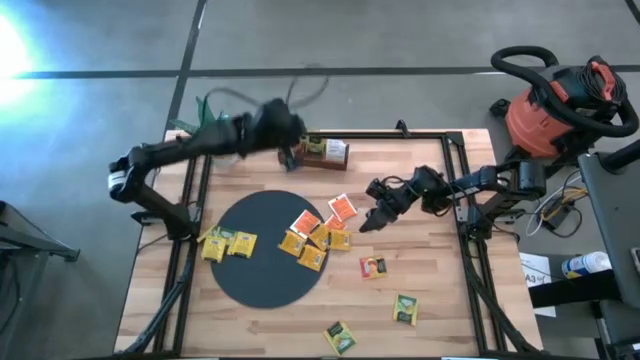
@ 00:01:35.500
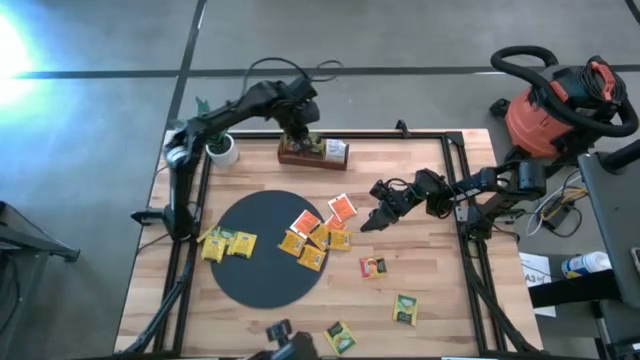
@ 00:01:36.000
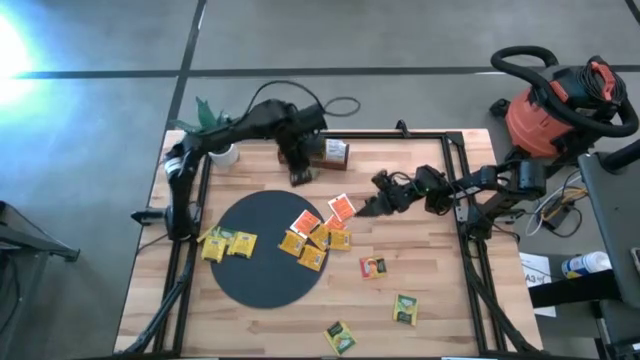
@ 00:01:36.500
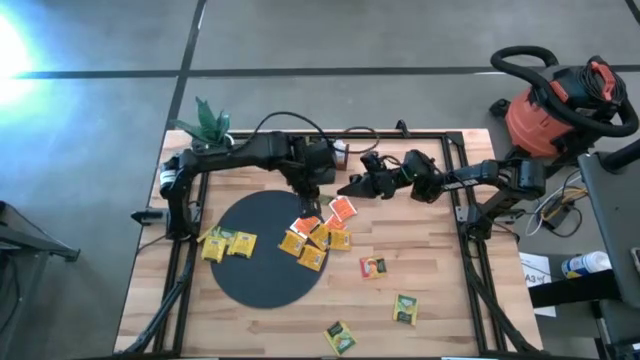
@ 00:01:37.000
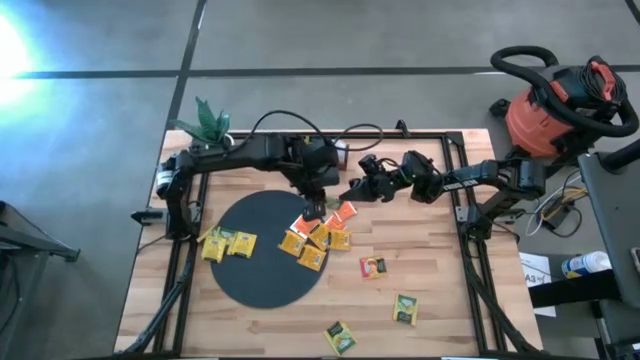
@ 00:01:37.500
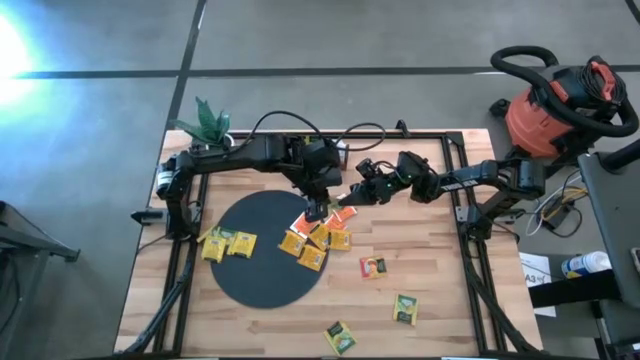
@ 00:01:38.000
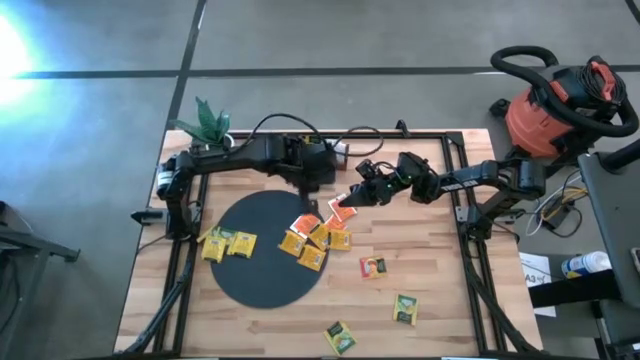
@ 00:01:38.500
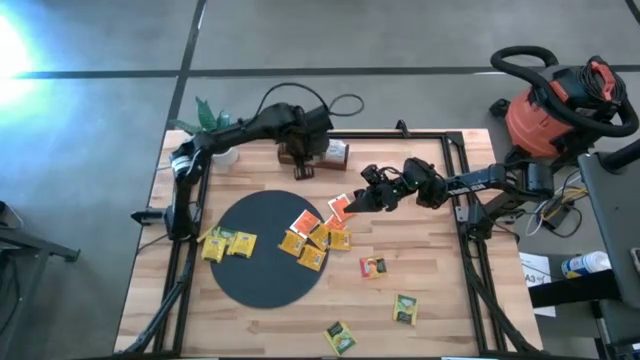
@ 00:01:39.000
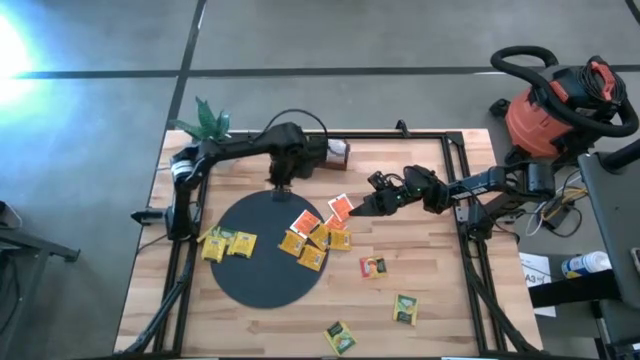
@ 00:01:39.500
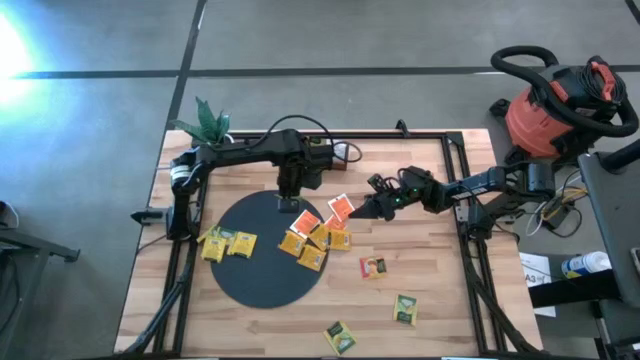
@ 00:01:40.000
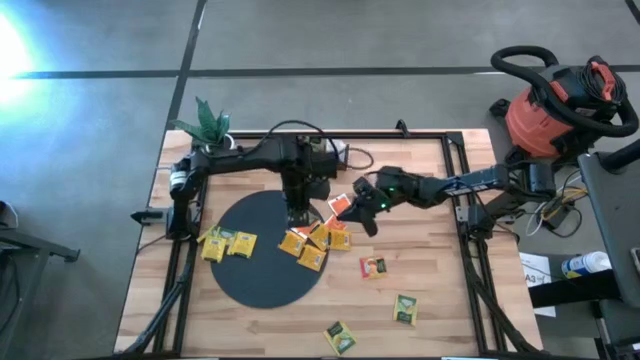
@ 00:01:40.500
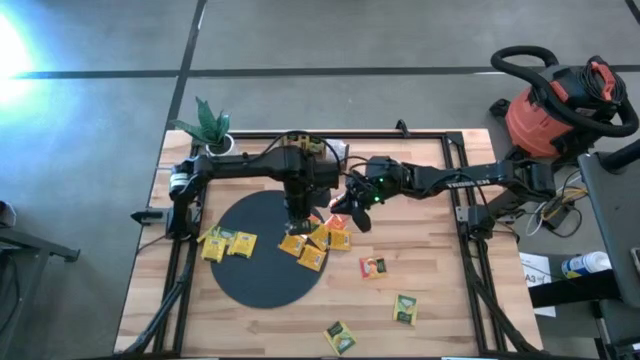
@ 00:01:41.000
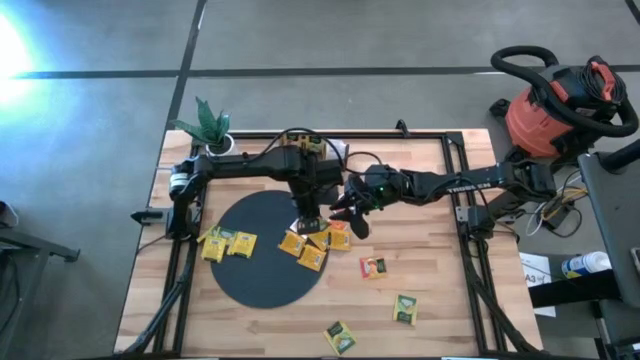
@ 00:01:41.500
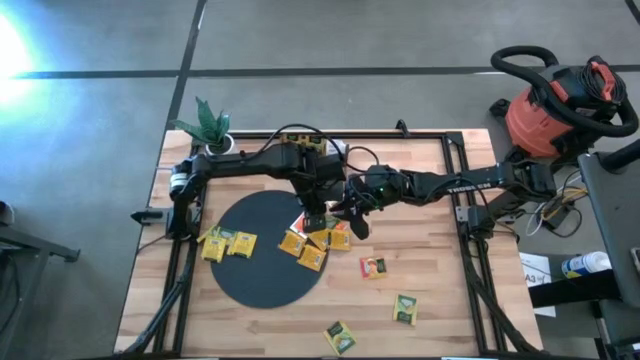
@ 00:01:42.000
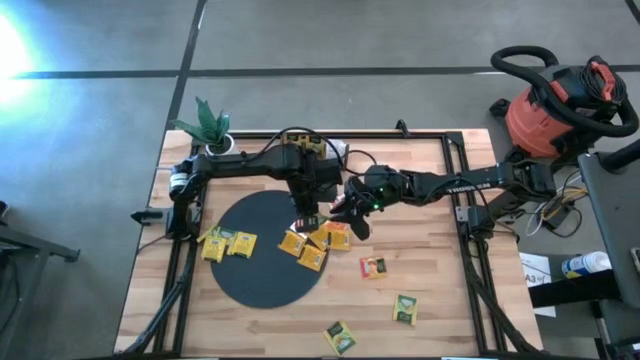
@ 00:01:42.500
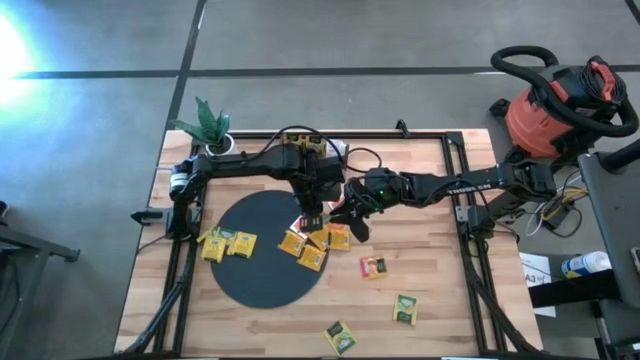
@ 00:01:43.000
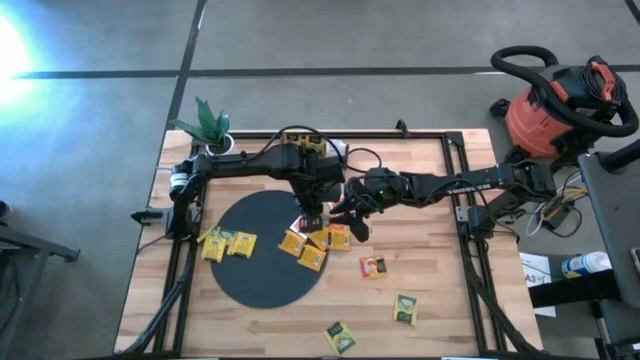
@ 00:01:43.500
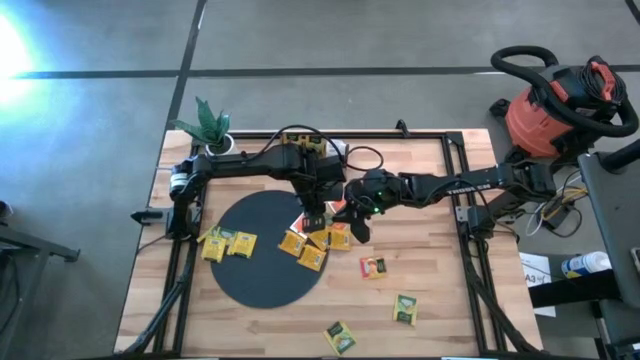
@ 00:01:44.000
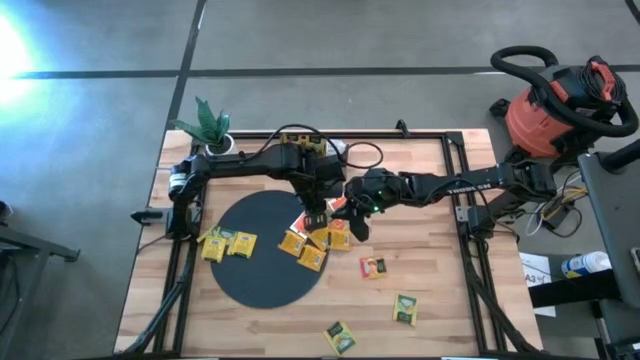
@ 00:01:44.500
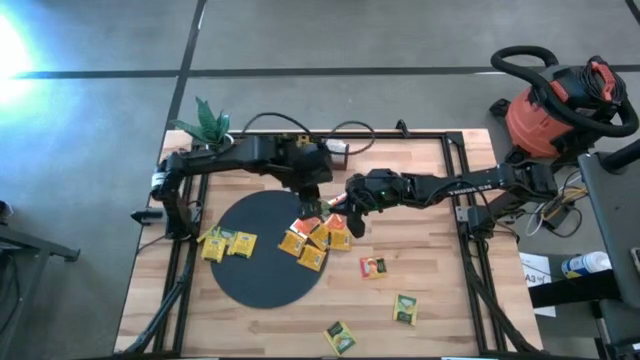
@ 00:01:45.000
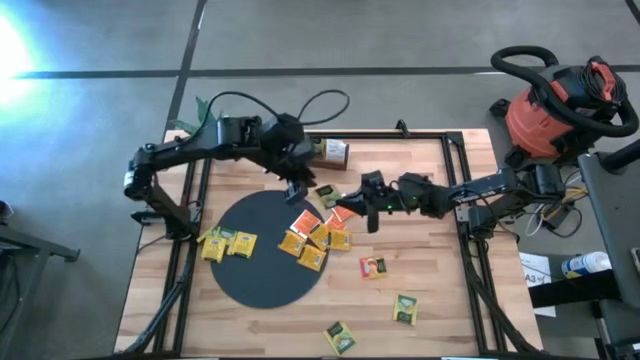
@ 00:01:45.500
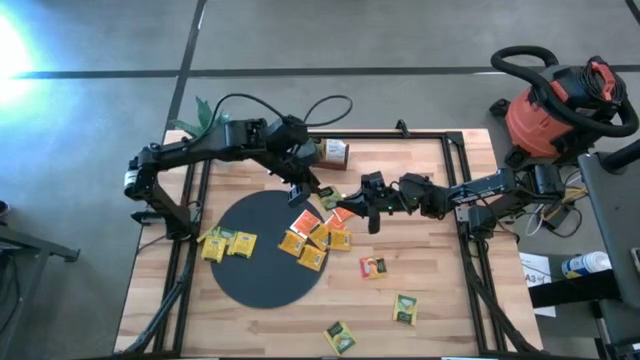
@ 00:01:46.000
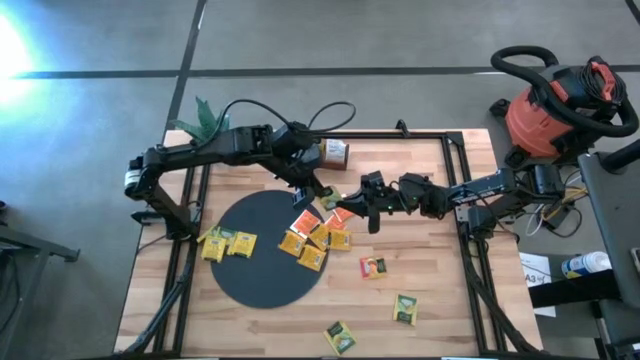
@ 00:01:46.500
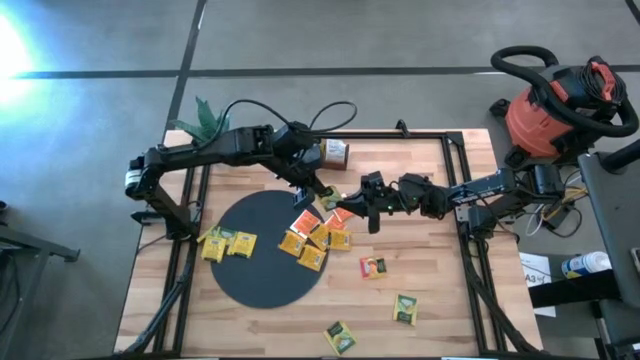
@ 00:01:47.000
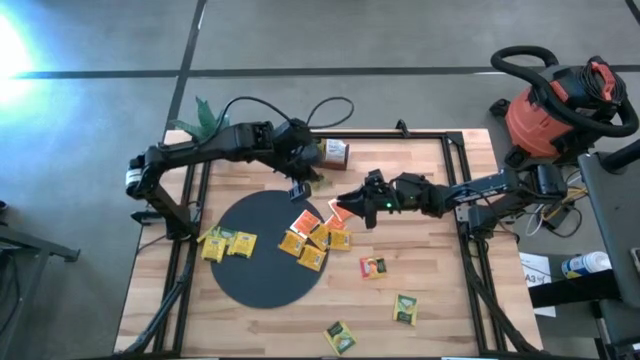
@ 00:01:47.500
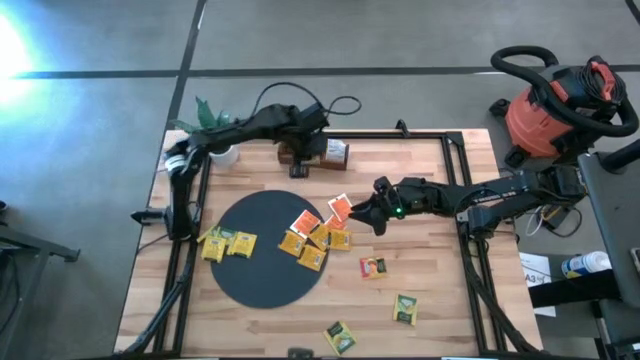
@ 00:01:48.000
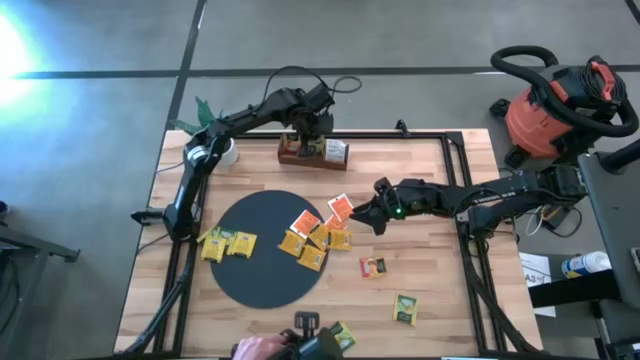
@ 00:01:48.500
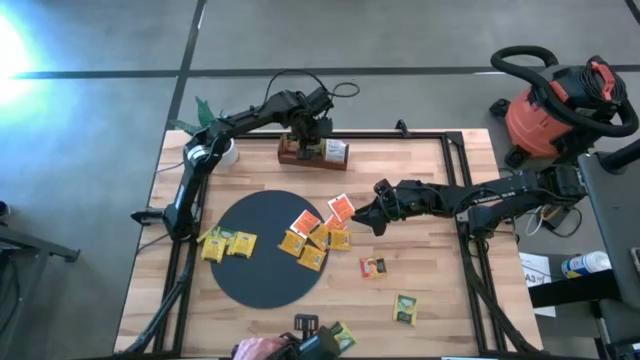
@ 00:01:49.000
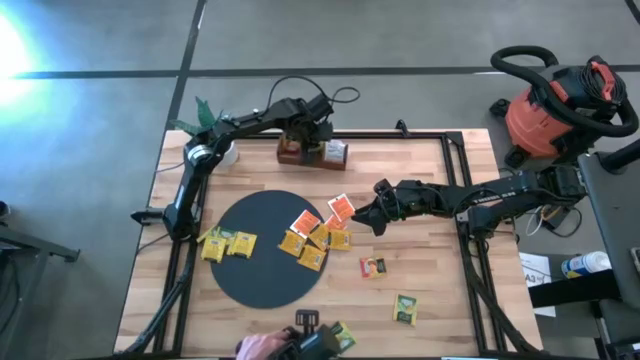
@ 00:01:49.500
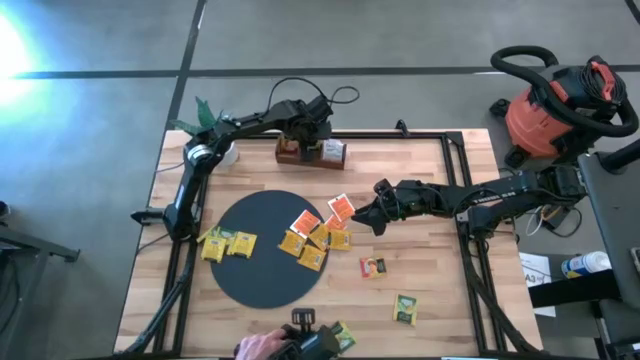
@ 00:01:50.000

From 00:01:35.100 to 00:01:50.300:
Task: Pick & Place Tea
Put the yellow tea bag into the middle section of the wooden organizer

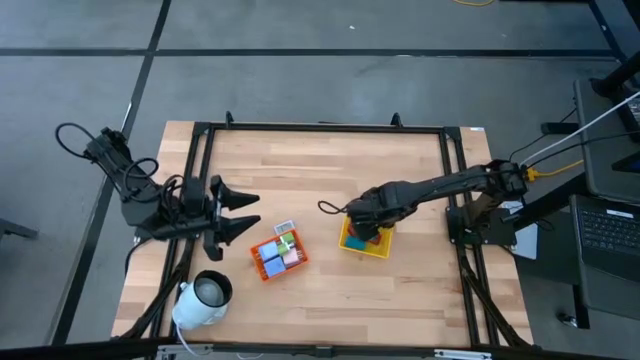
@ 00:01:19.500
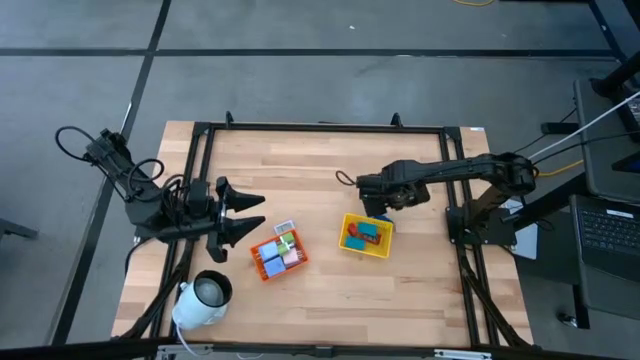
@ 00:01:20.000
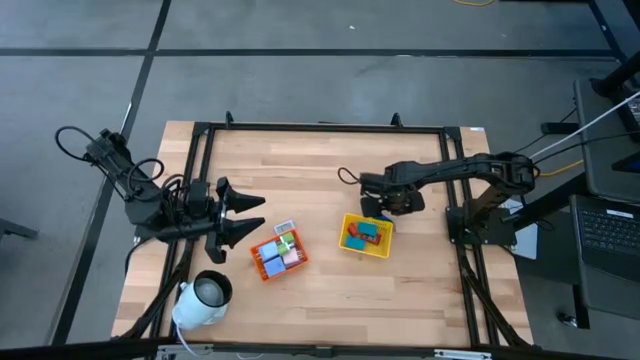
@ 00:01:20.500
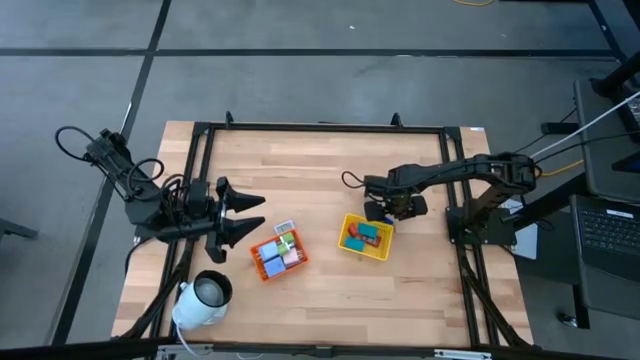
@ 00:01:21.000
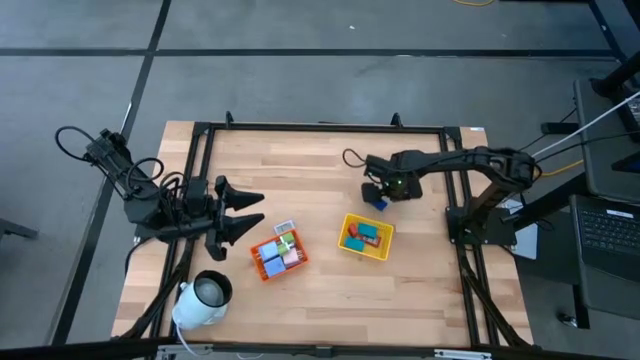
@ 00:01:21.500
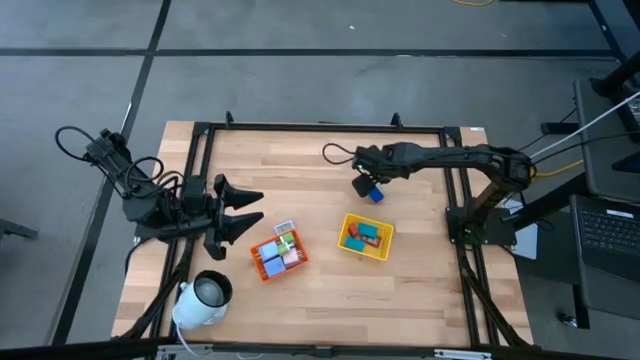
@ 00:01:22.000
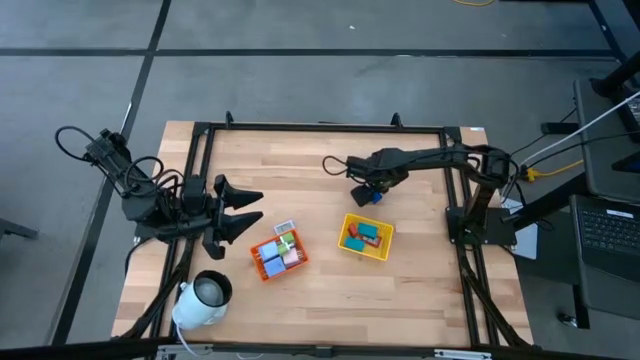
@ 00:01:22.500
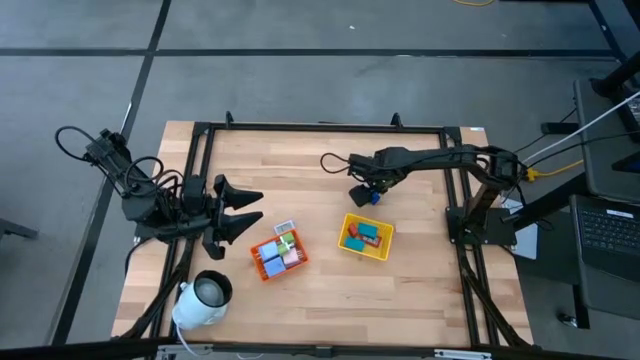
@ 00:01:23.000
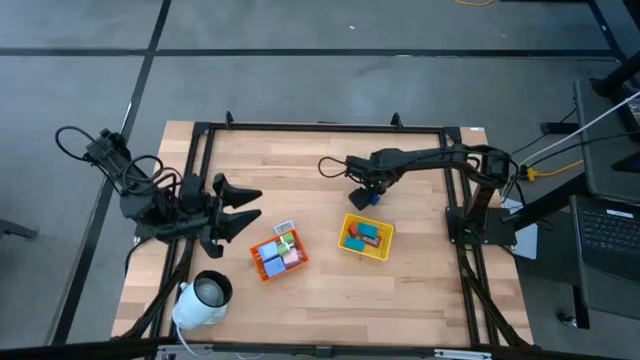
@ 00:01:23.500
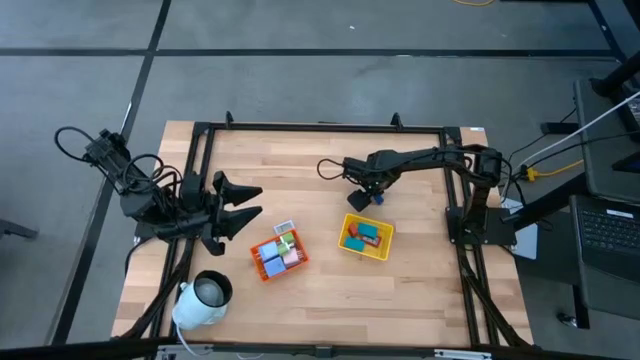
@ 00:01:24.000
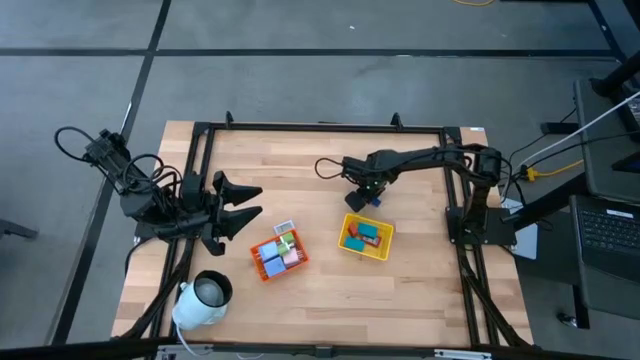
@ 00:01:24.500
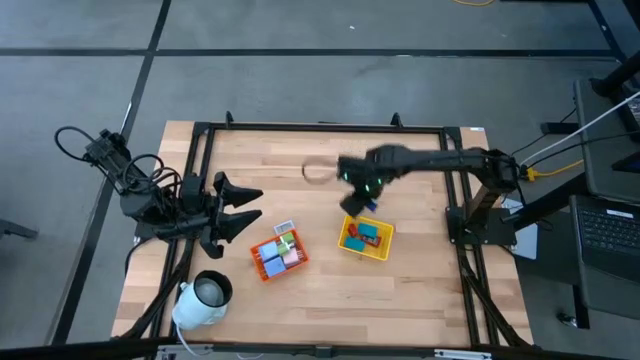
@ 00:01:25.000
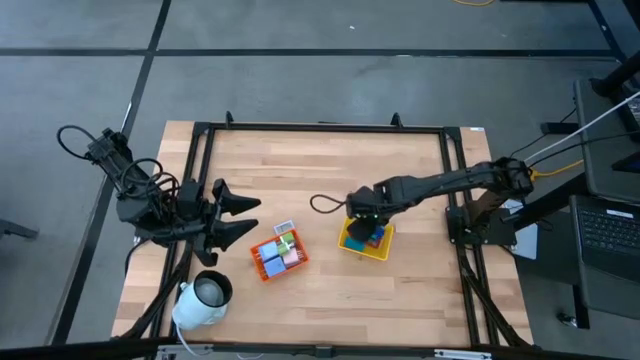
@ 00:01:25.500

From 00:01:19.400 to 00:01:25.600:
Task: Pick & Place Office items
Put the blue digital clock into the yellow bin
